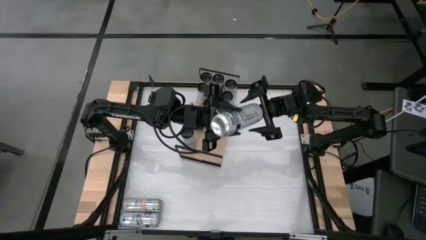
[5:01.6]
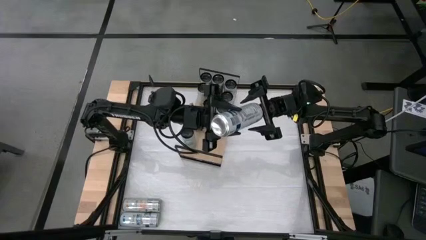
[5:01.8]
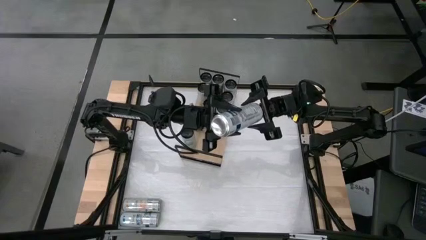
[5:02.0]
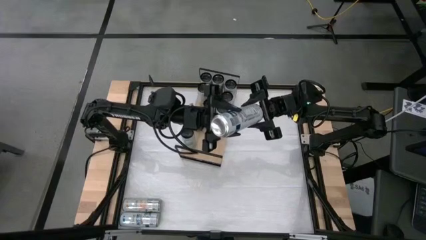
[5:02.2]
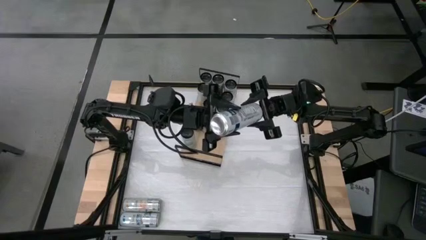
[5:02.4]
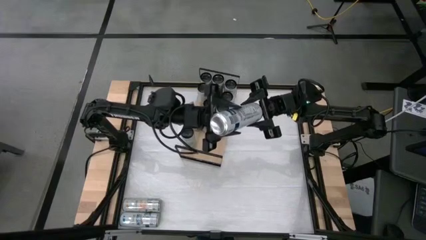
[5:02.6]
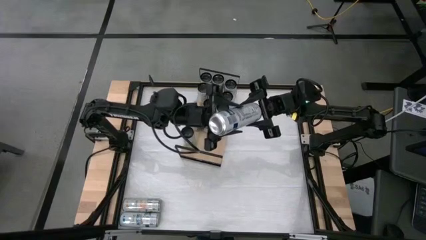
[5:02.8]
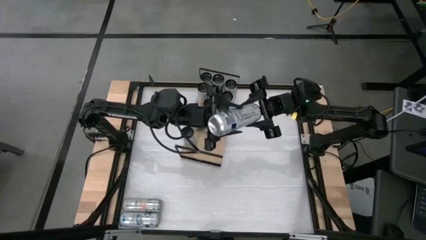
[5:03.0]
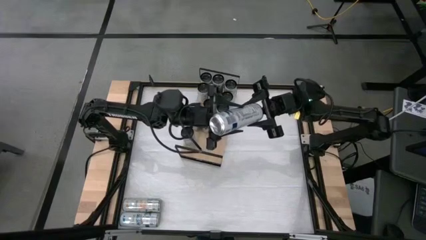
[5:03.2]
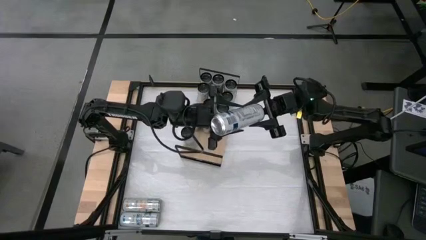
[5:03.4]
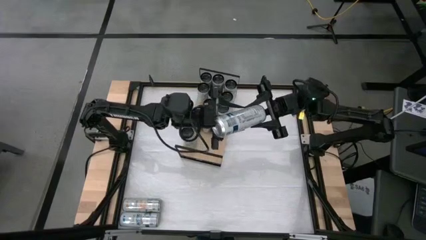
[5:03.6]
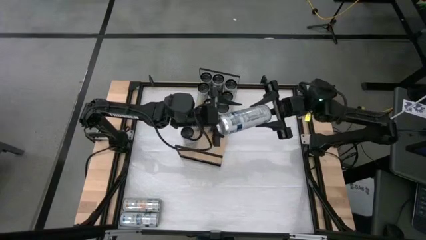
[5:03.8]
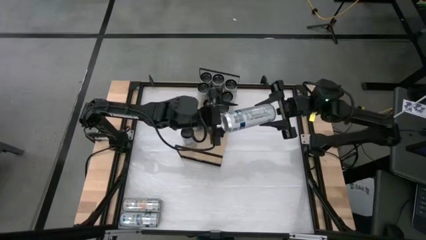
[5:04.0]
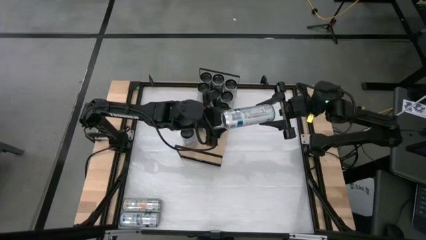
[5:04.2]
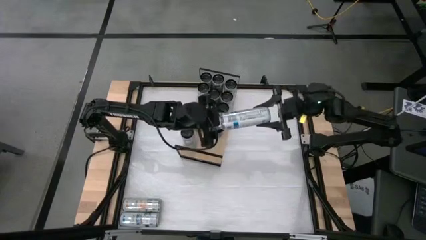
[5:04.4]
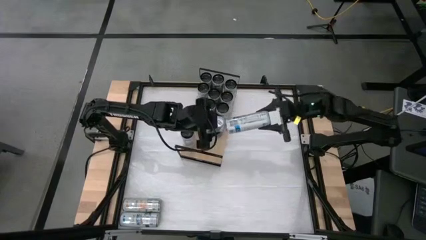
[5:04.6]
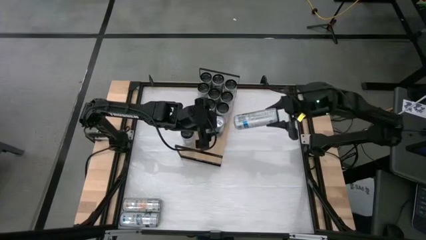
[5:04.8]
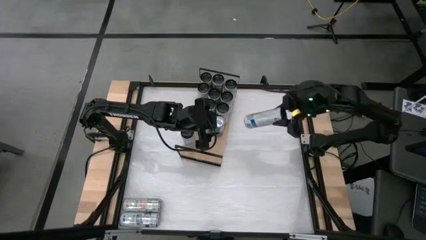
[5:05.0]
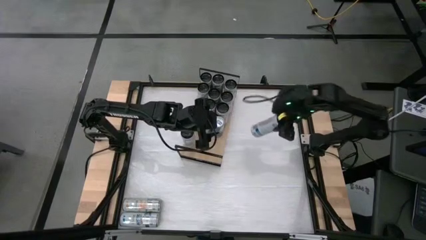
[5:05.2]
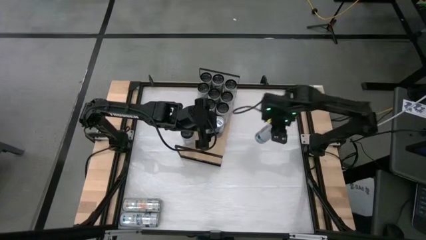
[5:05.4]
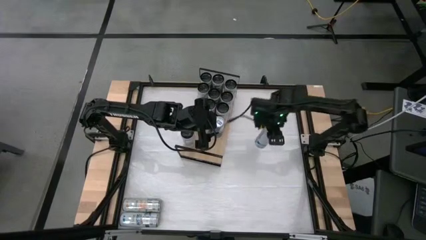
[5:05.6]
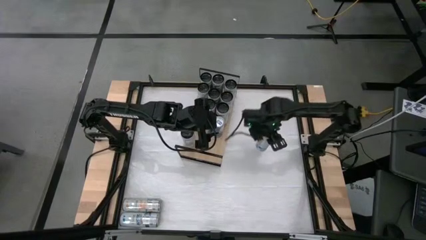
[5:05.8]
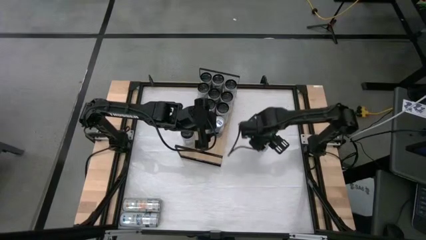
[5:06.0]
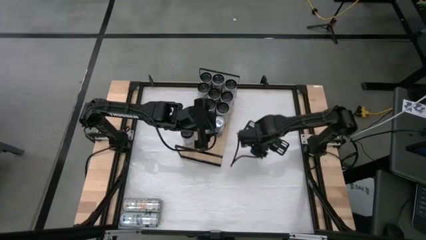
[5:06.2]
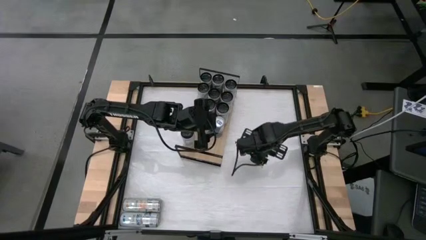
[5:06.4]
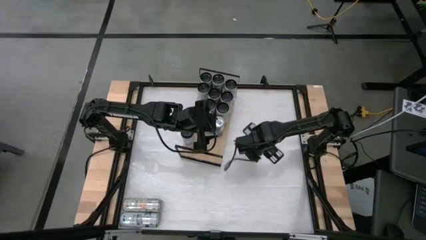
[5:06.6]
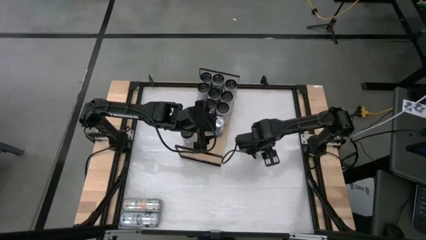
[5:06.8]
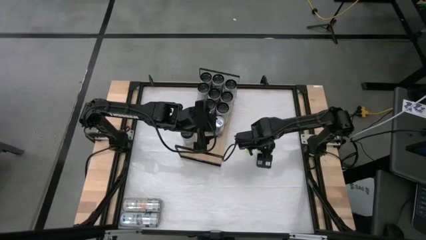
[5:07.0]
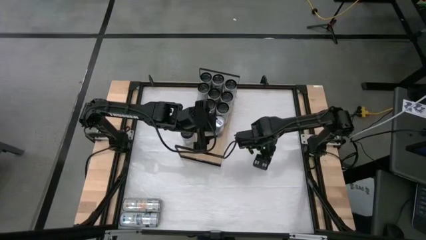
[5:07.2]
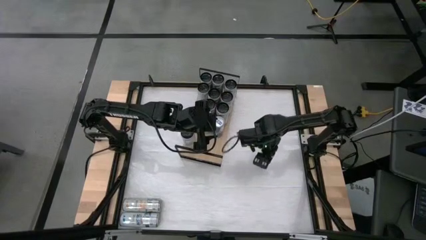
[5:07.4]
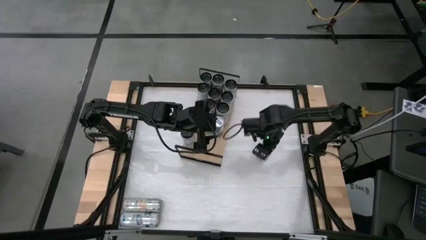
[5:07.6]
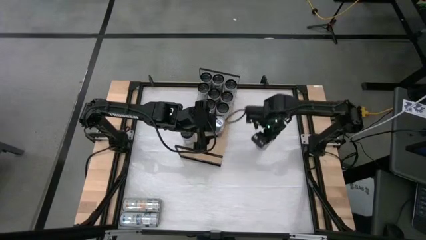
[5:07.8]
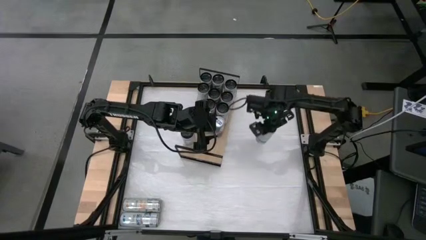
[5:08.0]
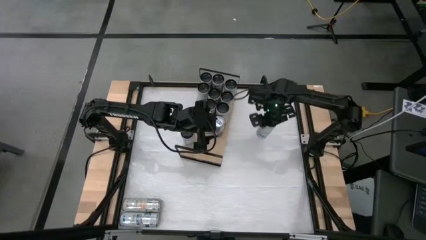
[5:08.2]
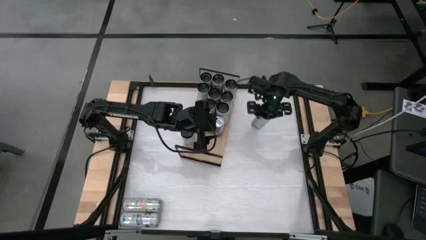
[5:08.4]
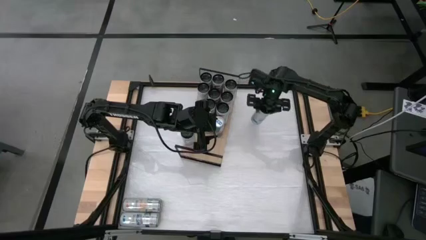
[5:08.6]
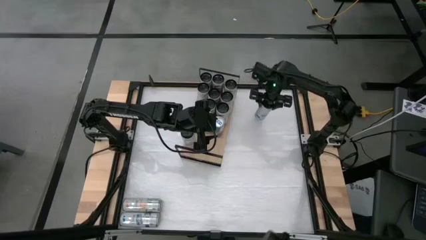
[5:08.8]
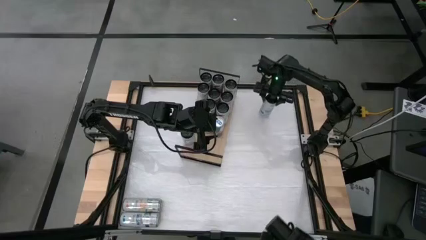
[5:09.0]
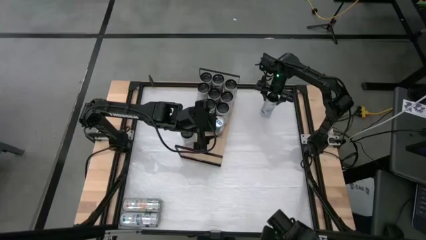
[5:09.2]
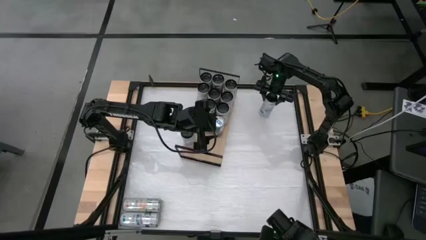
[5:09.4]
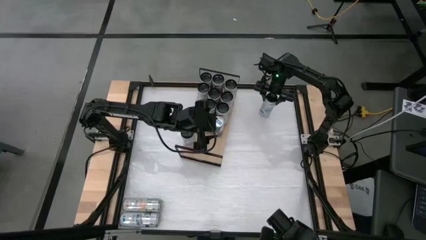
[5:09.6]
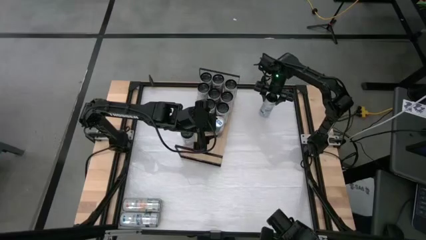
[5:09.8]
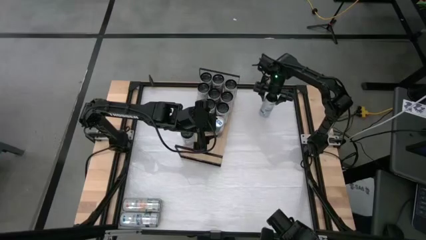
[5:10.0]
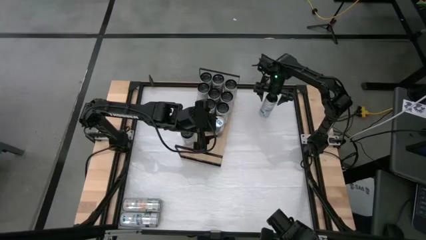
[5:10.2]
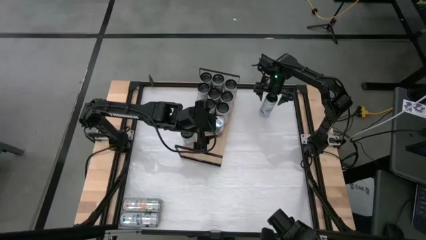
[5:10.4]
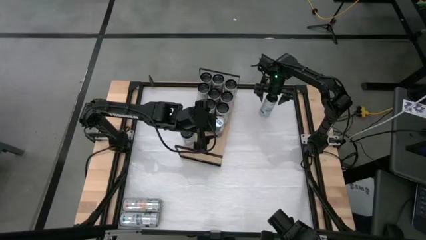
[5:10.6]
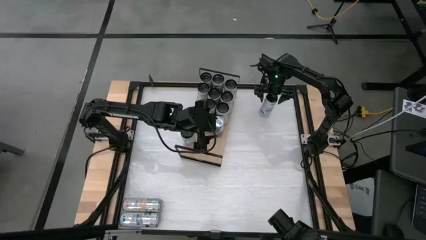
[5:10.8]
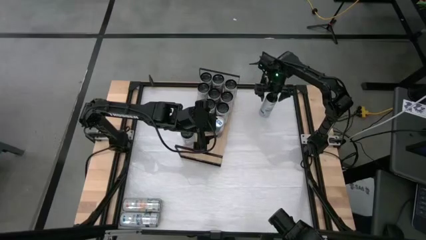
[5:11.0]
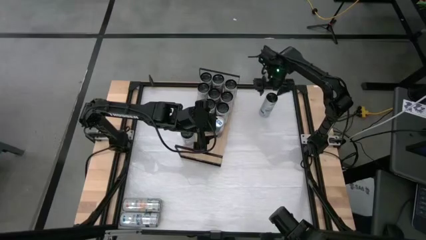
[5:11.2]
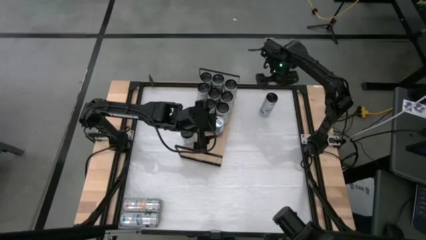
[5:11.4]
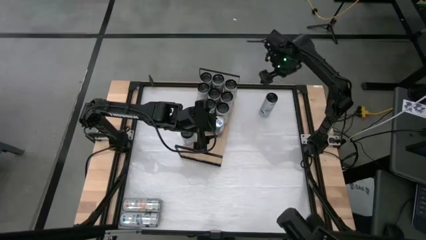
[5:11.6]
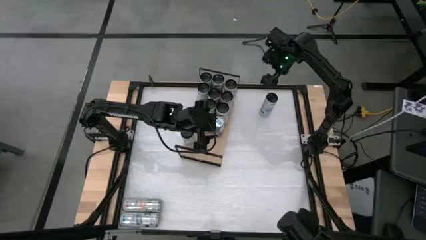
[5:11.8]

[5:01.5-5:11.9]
Task: Place canned beverage on shelf
Move the middle left blue soda can to the top right of the shelf

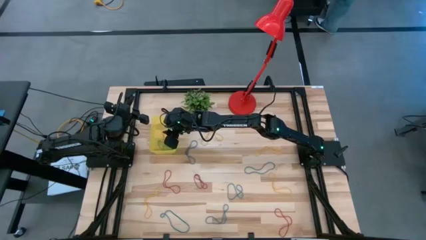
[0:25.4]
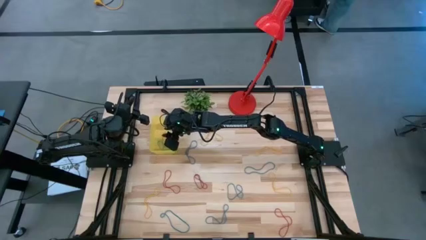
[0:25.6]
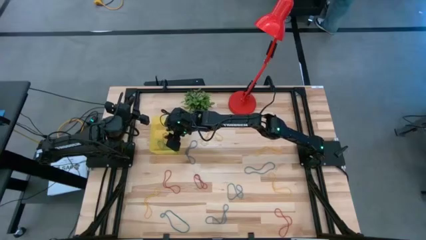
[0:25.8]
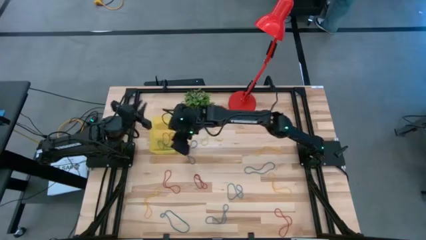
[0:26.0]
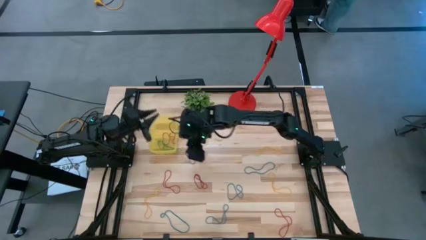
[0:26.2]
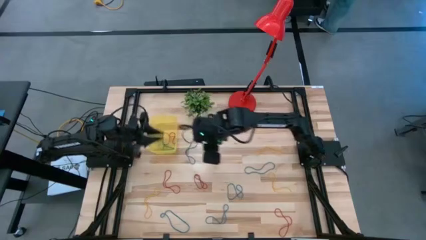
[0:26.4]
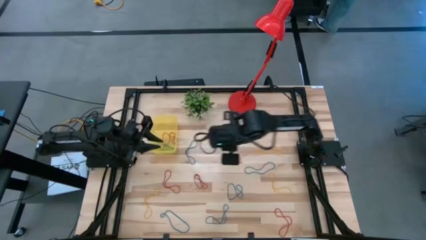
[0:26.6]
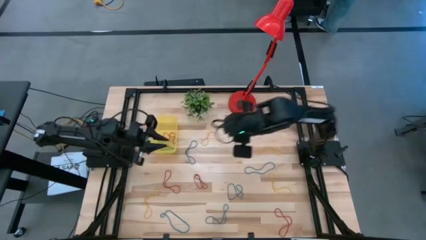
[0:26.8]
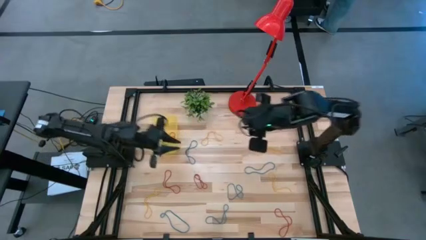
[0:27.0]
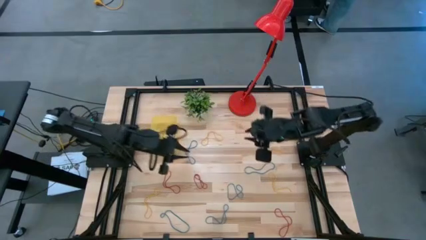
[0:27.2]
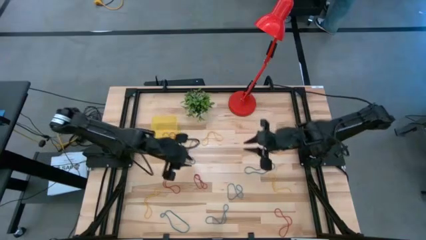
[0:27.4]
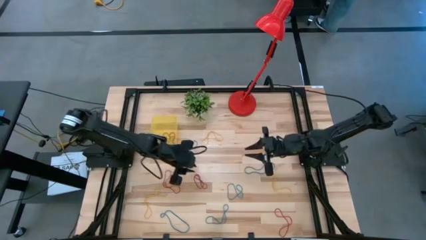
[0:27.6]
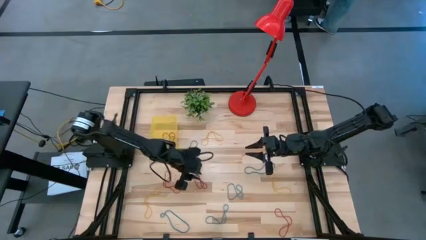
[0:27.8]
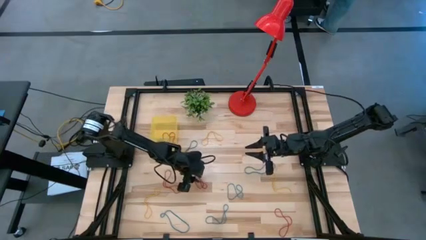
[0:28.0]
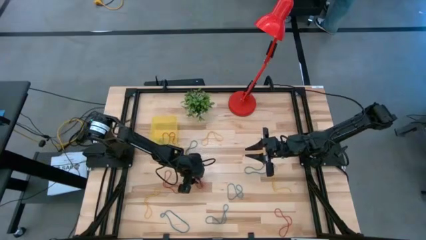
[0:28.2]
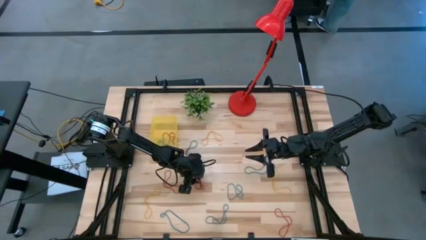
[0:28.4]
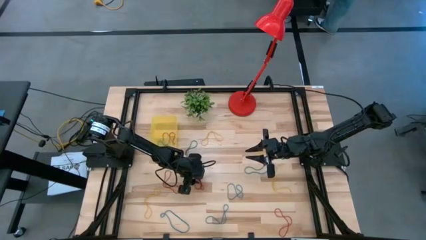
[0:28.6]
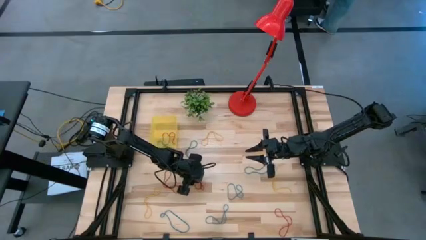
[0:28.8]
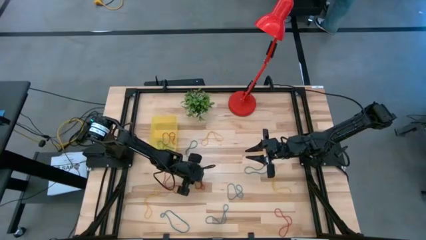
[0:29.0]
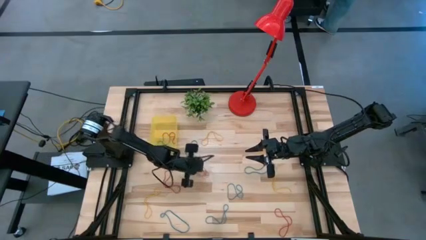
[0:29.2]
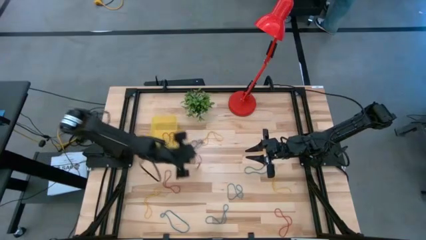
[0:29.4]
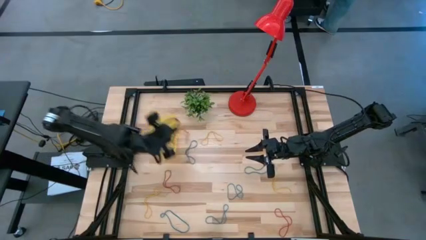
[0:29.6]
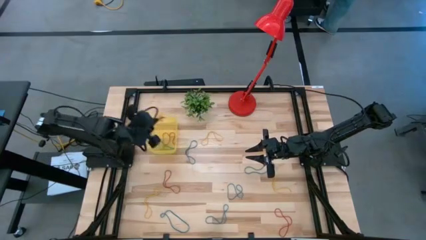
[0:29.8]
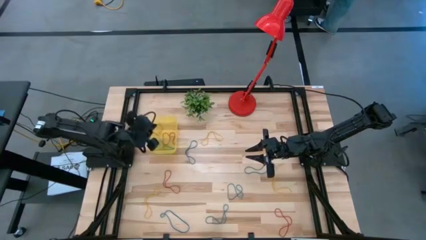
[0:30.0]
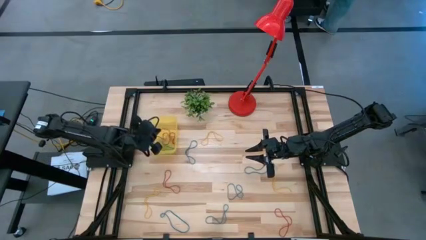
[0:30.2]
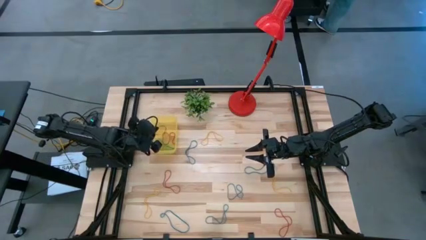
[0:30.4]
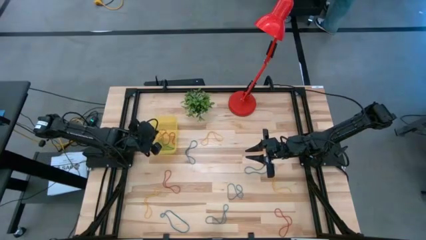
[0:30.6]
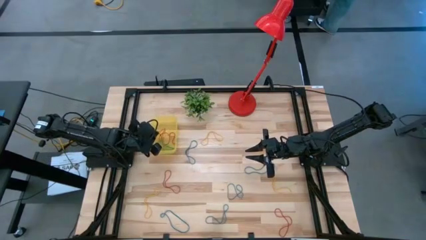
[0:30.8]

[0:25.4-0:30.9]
Task: Pick and place items into bin
Put the red rubber band into the yellow bin
